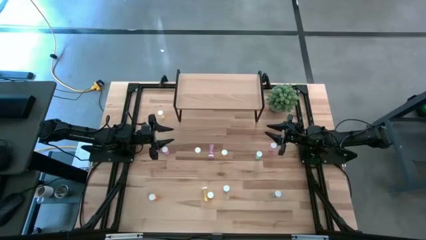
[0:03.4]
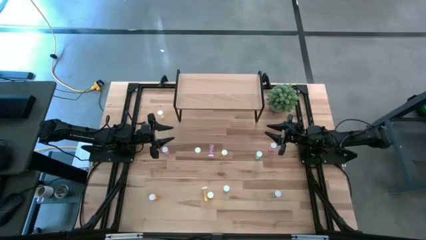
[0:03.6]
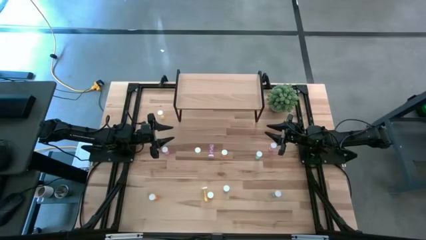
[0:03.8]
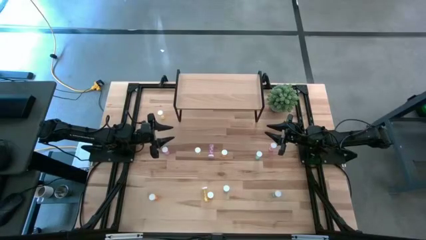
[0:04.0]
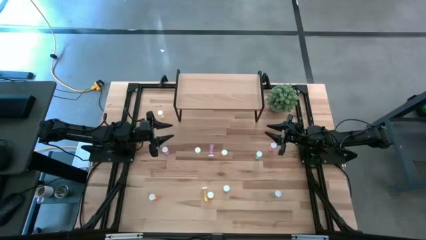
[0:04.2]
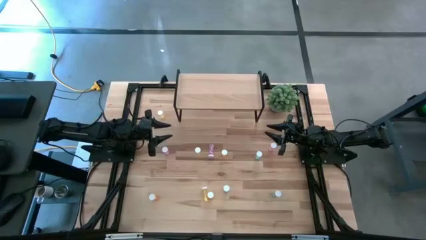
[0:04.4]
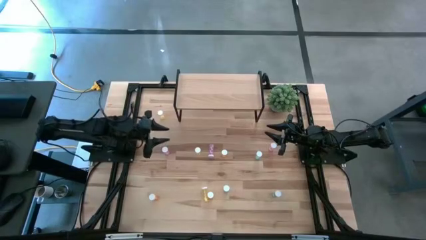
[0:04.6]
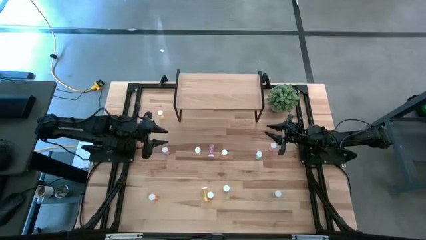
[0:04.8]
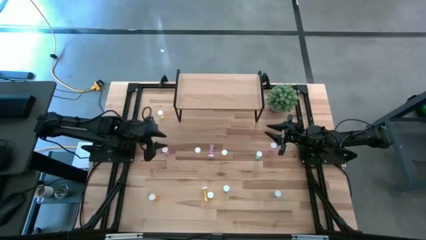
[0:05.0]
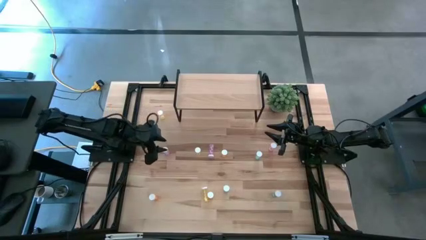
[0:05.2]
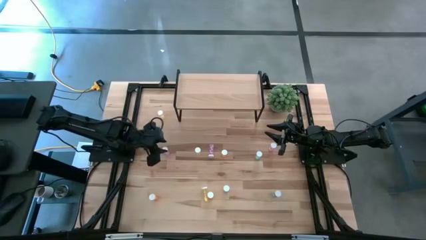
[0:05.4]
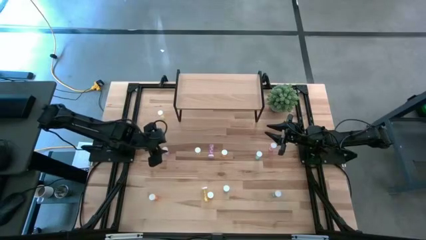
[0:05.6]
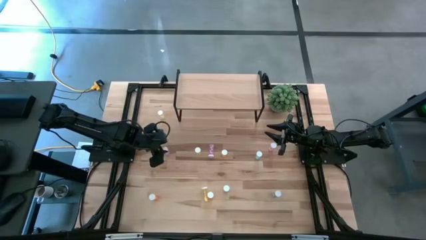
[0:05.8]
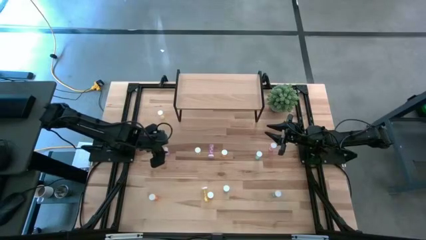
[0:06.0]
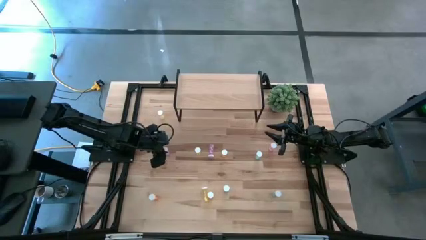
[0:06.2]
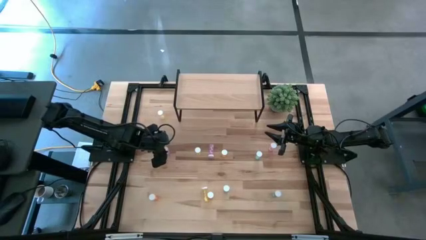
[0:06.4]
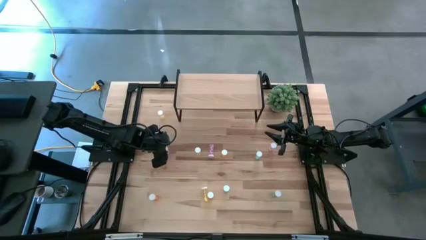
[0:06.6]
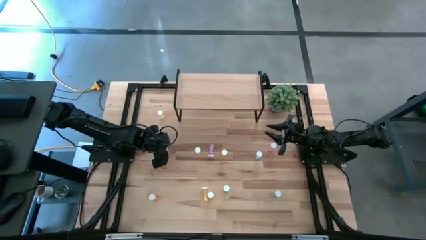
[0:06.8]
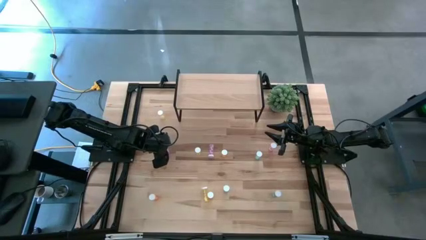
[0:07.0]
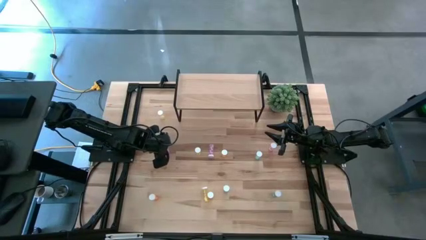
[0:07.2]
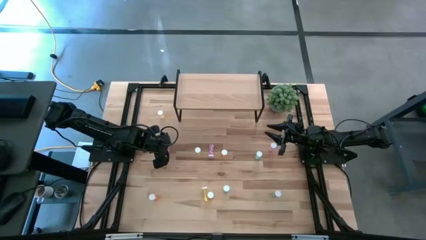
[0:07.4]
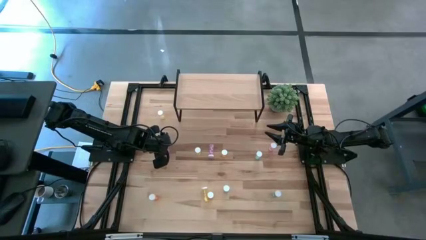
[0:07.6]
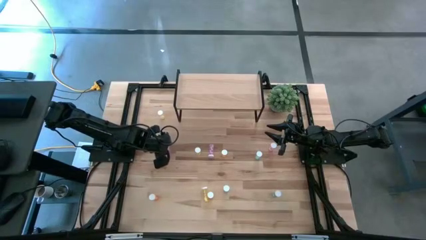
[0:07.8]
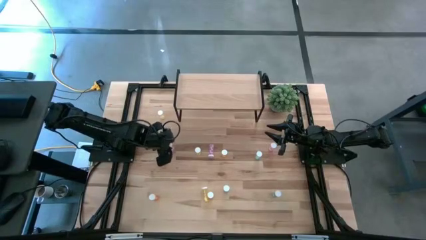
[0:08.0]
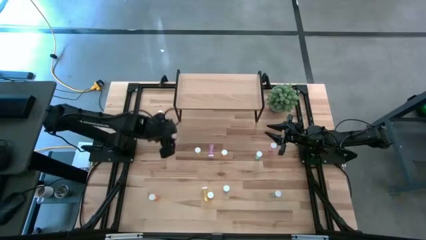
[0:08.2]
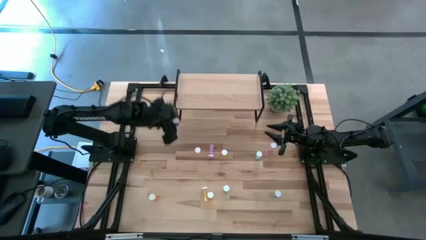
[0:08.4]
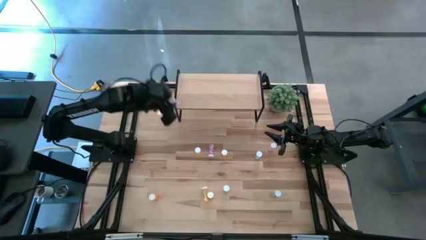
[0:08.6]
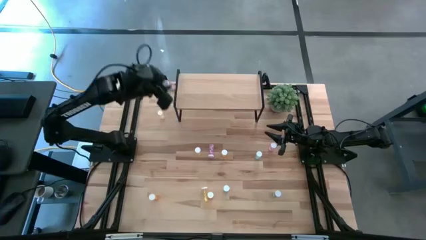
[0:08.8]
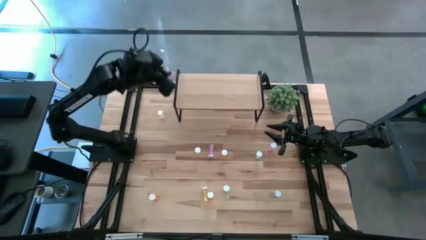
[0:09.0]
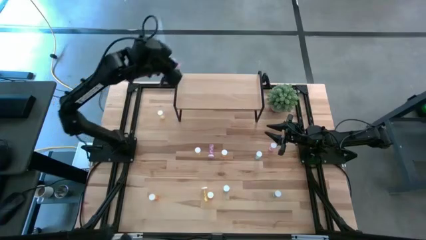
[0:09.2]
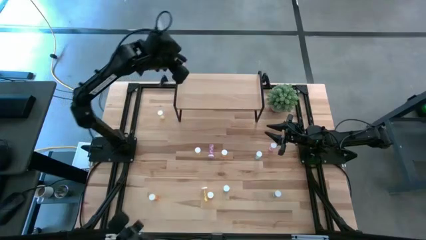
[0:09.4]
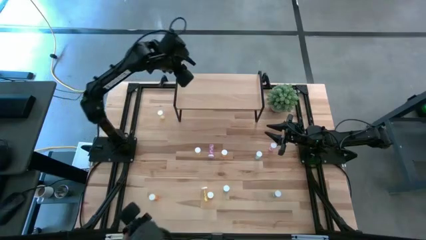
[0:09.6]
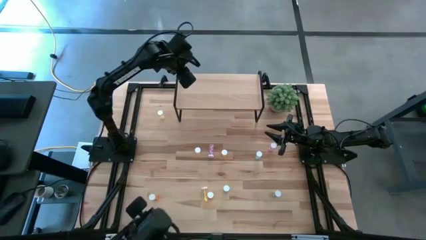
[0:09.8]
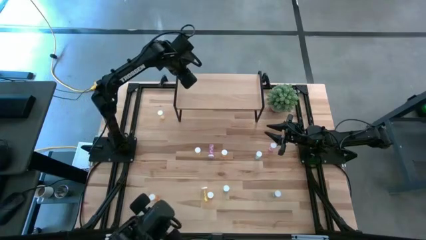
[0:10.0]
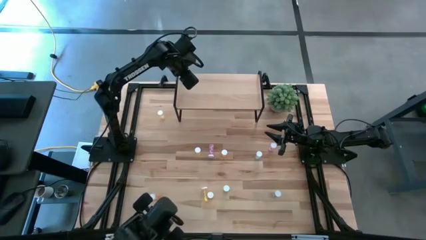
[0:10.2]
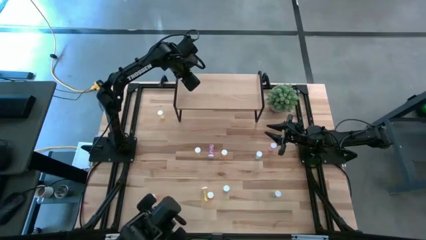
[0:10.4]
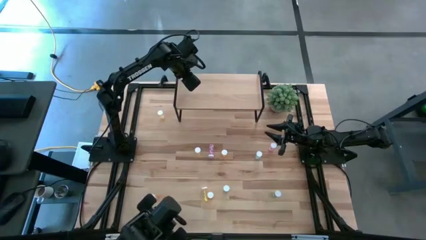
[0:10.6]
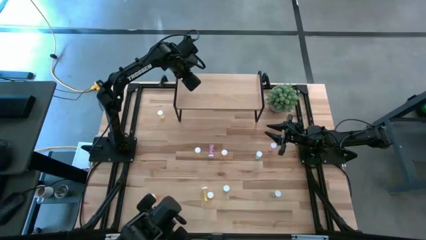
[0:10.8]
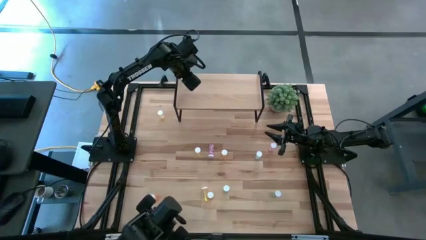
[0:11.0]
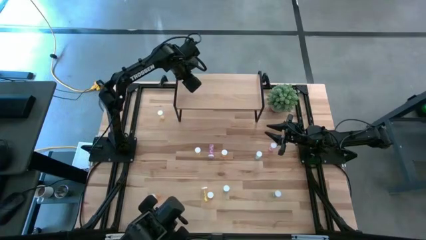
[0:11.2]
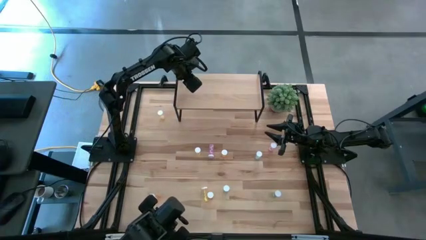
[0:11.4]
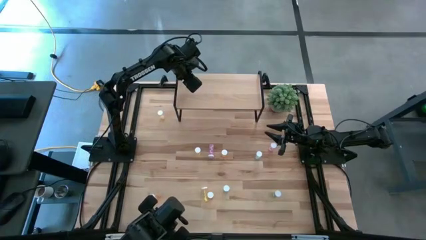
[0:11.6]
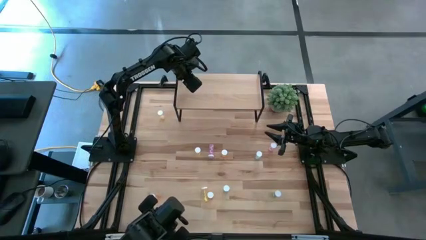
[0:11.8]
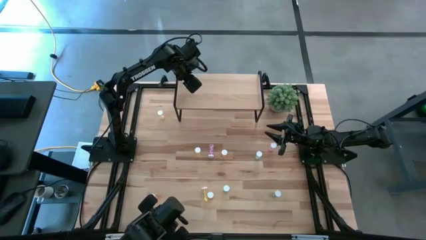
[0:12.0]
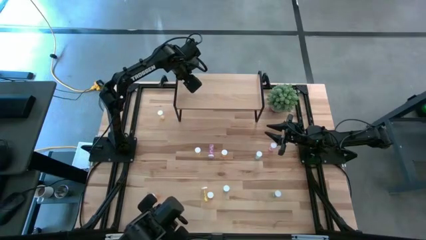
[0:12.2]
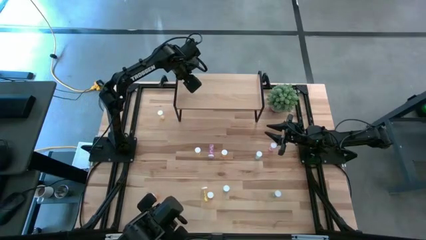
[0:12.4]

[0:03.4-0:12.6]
Task: Pick and place medicine bottles onto shelf by color
Put the left pink pill bottle on the shelf

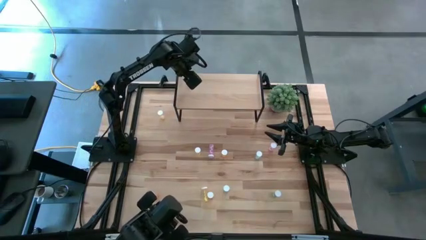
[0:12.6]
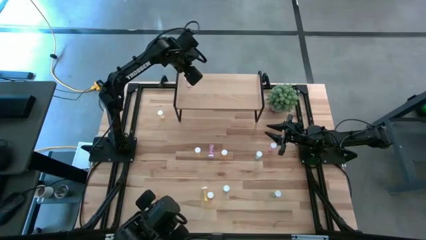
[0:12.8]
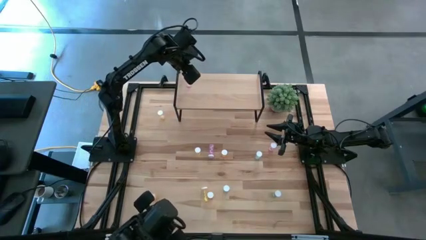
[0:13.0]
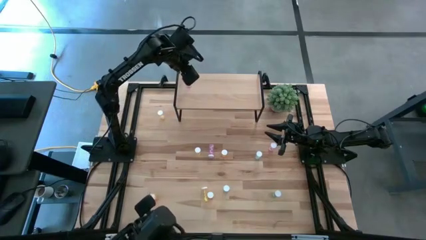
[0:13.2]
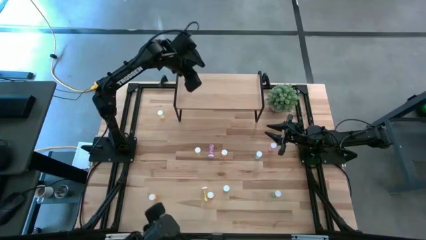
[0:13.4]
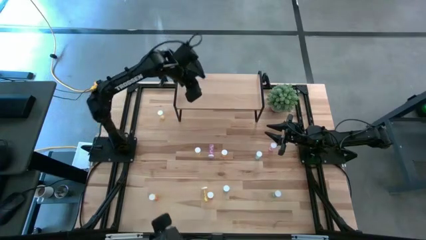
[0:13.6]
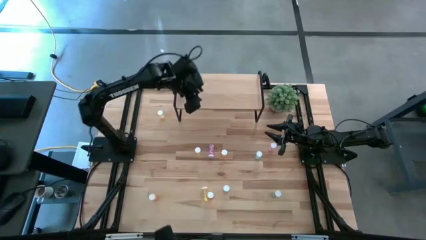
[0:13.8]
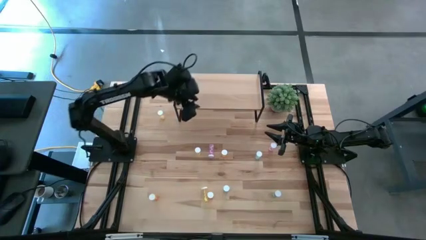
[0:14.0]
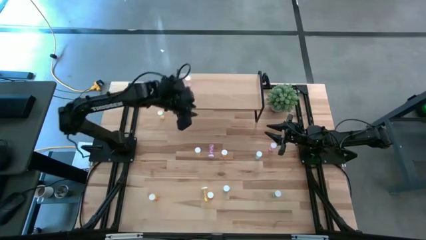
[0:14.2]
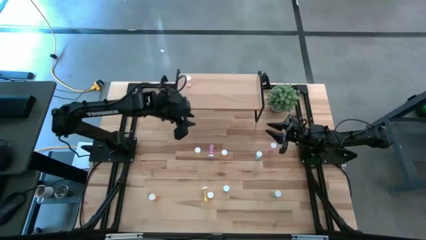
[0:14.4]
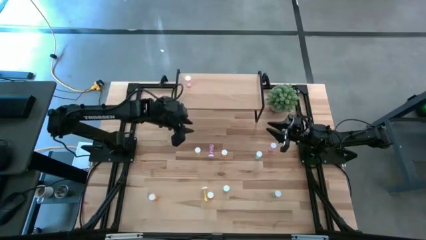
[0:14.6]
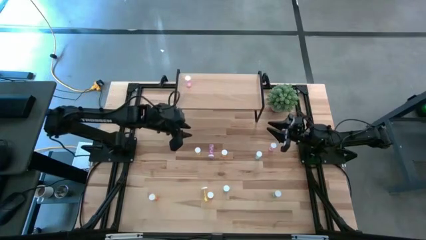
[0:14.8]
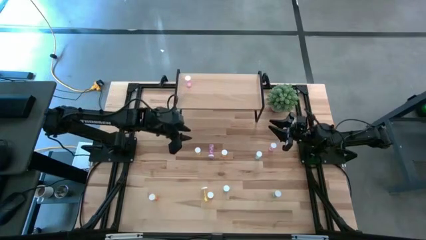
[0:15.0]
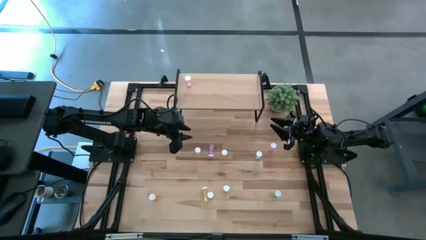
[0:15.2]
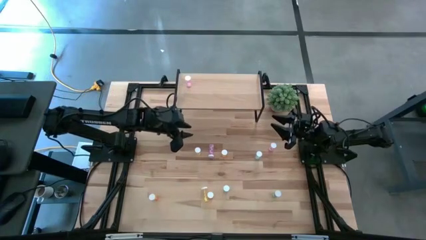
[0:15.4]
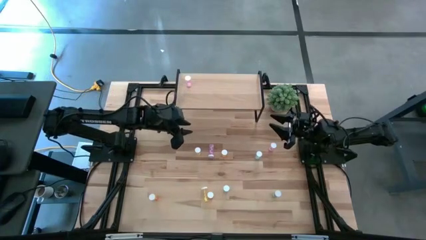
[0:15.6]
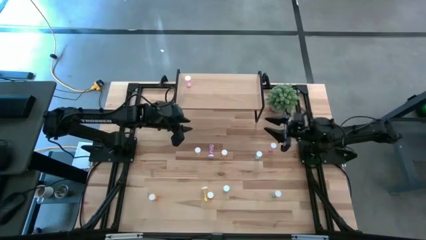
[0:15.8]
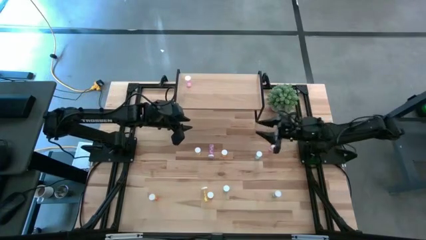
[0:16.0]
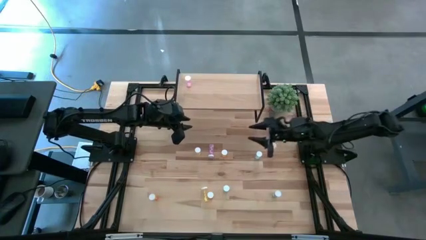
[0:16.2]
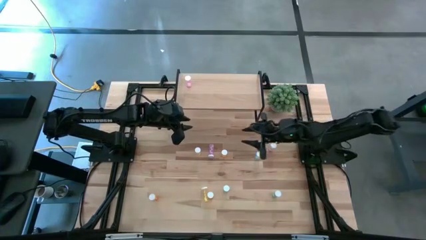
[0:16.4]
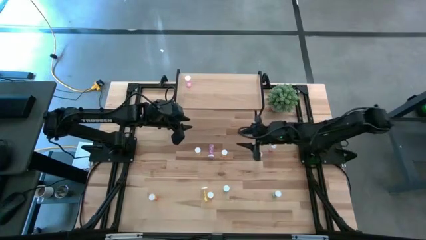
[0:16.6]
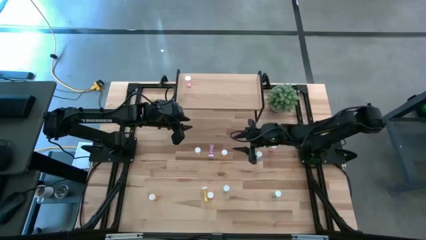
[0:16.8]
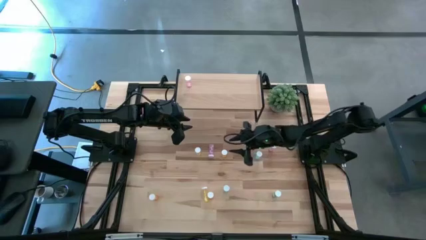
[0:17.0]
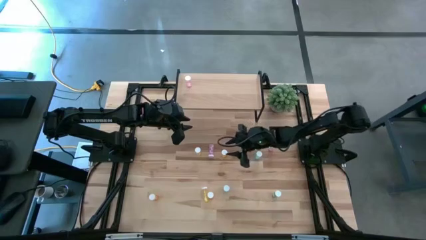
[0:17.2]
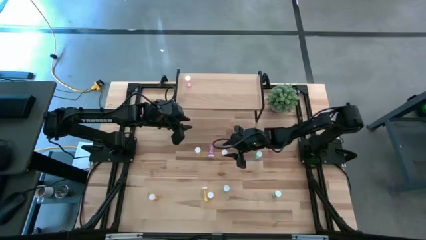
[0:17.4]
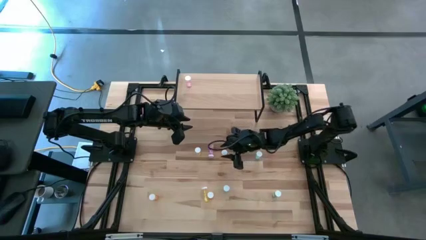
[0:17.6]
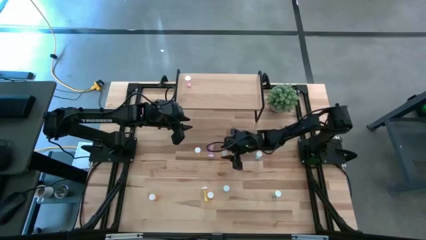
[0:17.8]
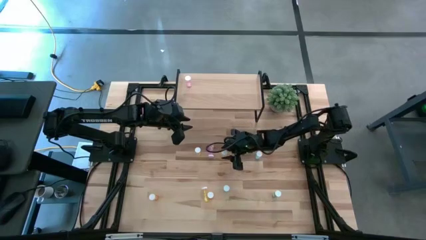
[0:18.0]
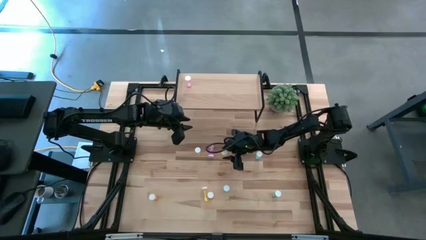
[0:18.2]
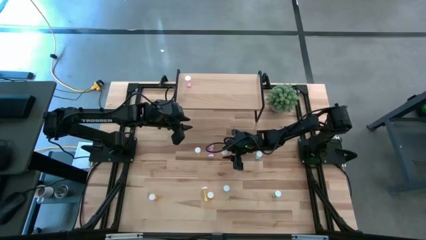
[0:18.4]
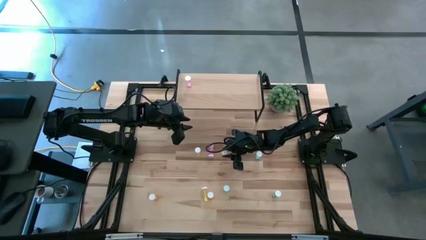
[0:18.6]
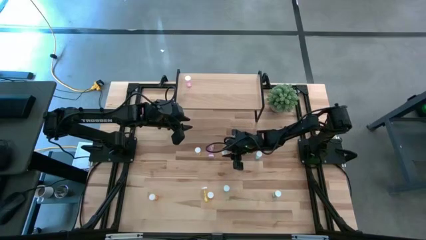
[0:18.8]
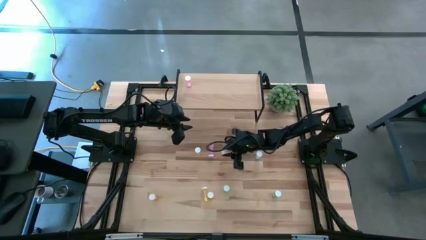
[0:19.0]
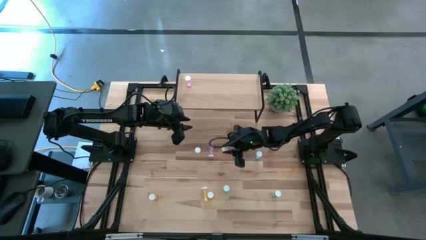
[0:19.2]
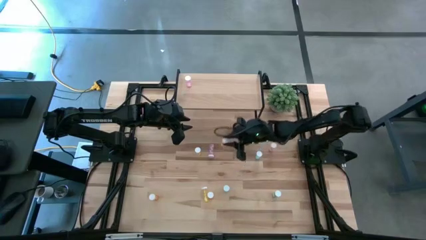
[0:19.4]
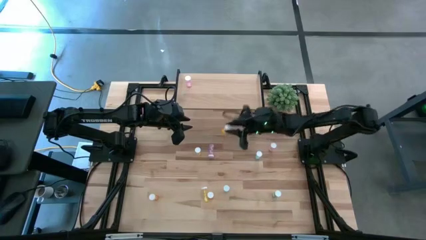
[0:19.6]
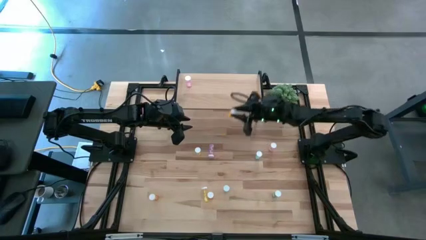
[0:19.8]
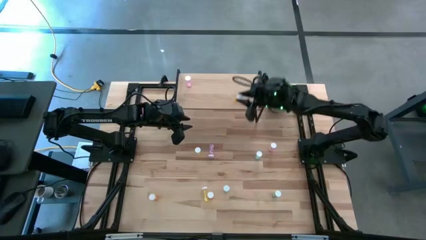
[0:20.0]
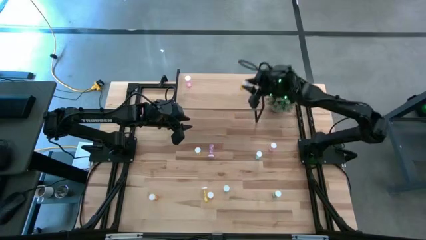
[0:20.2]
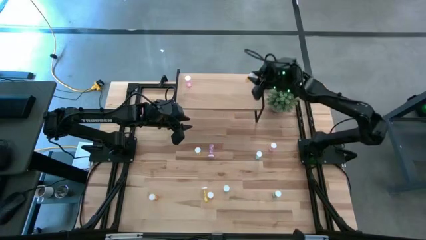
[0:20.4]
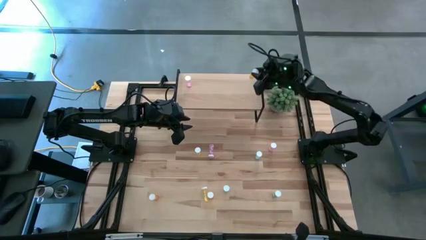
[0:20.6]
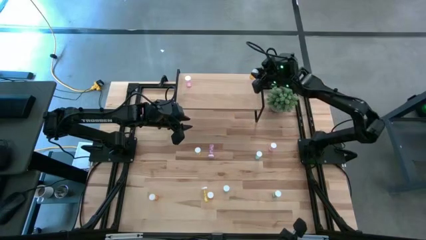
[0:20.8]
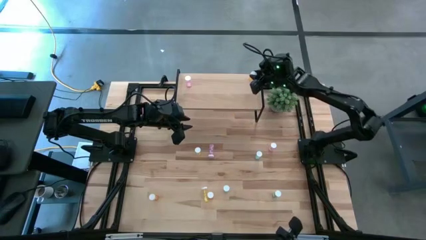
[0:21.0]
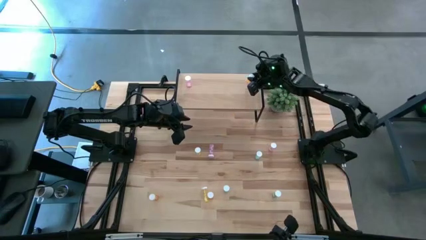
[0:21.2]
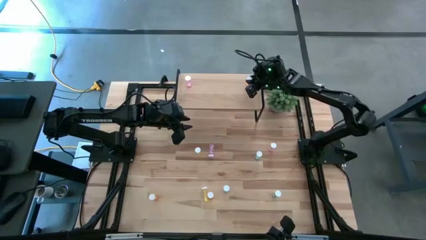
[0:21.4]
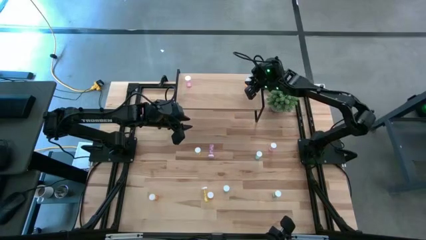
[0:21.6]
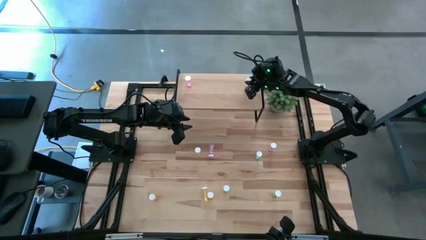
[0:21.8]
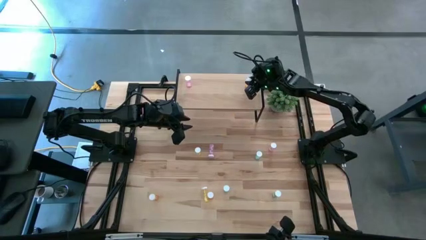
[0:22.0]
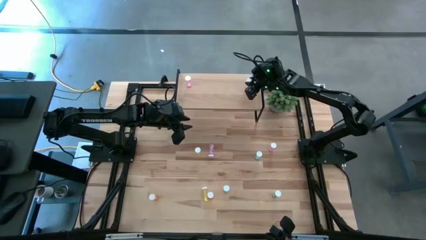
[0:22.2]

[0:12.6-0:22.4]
Put the top orange pill bottle on the shelf
